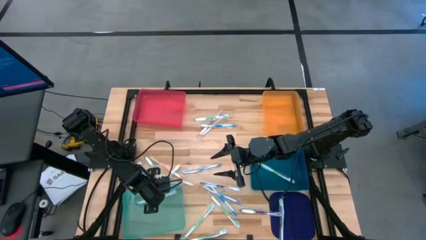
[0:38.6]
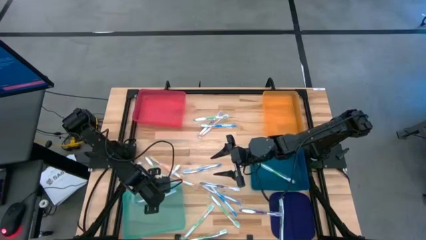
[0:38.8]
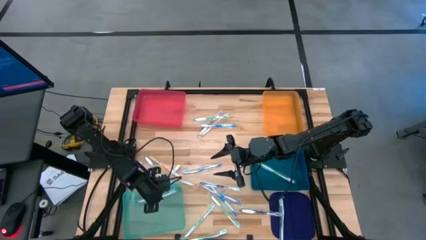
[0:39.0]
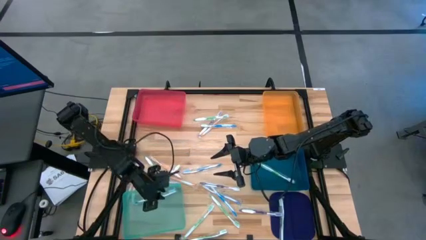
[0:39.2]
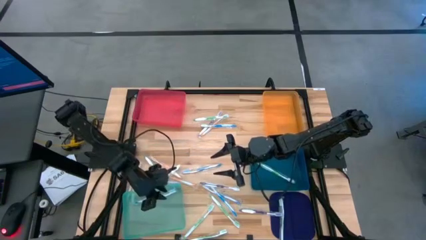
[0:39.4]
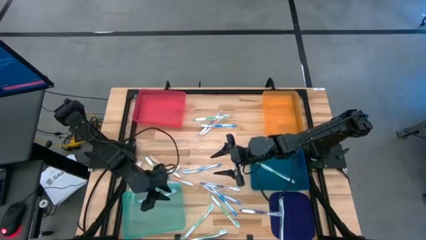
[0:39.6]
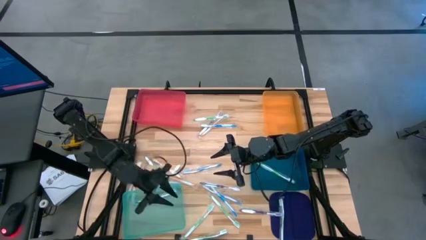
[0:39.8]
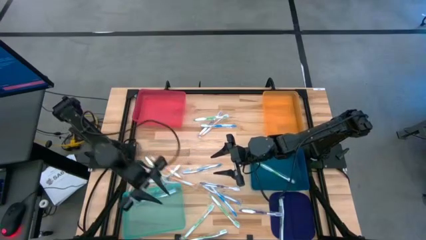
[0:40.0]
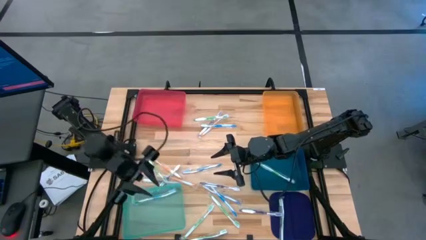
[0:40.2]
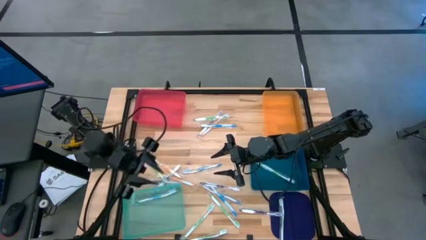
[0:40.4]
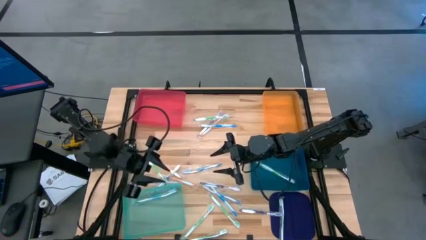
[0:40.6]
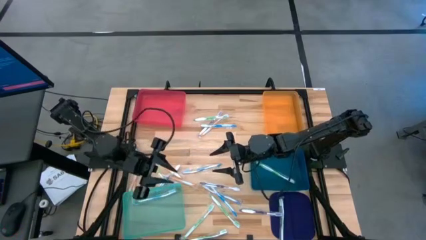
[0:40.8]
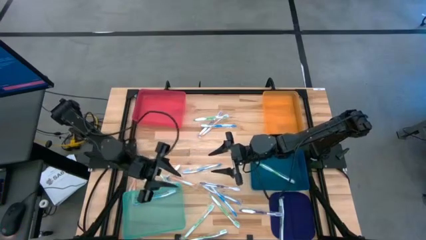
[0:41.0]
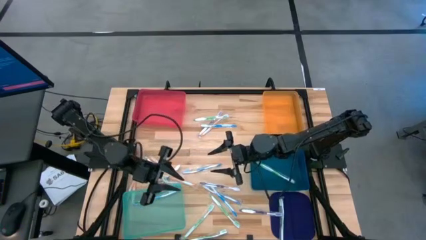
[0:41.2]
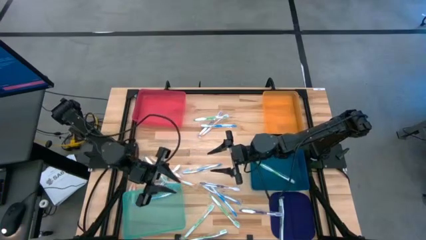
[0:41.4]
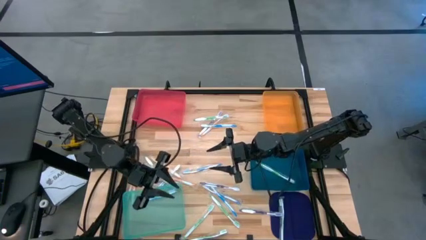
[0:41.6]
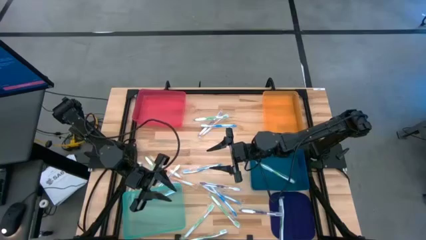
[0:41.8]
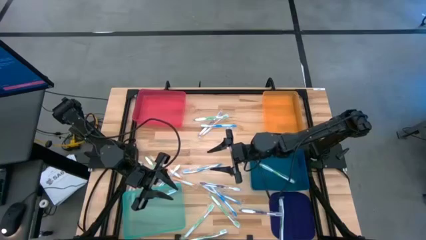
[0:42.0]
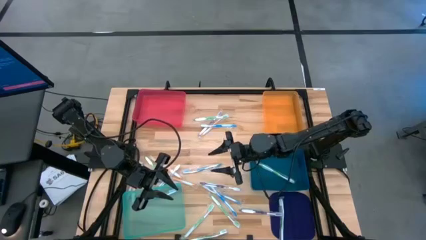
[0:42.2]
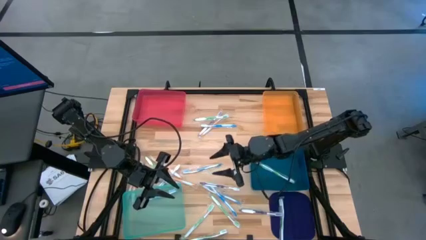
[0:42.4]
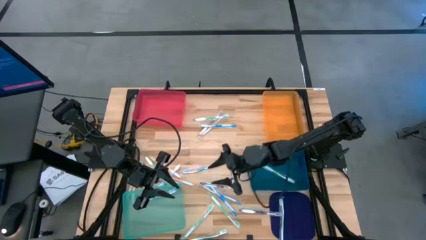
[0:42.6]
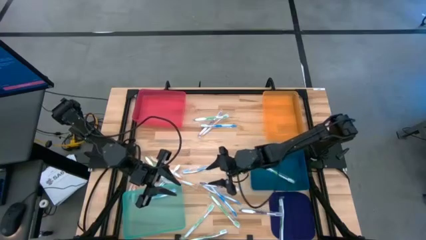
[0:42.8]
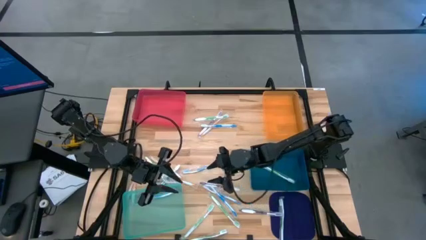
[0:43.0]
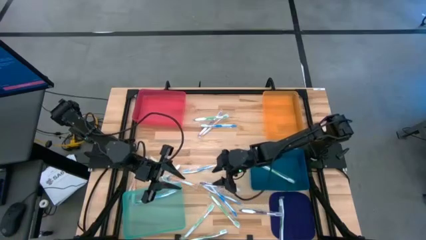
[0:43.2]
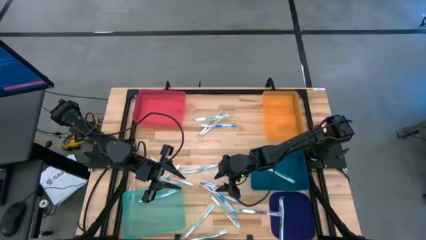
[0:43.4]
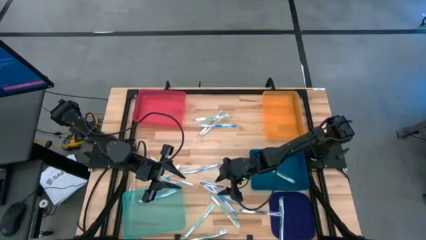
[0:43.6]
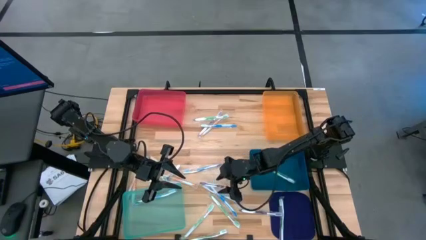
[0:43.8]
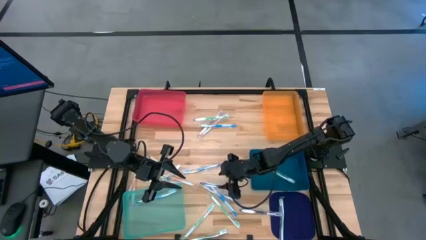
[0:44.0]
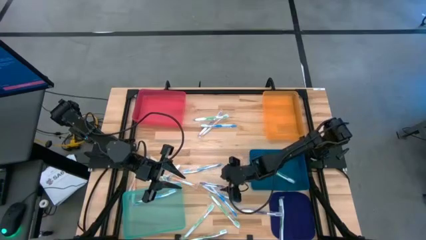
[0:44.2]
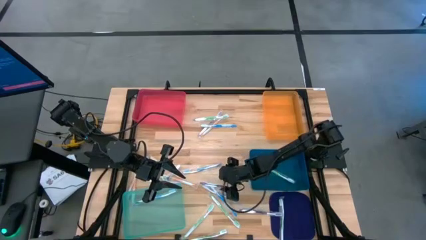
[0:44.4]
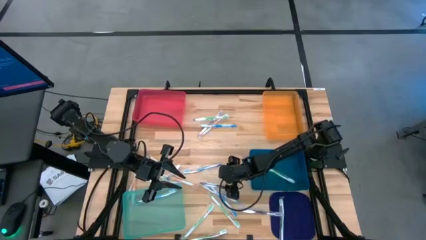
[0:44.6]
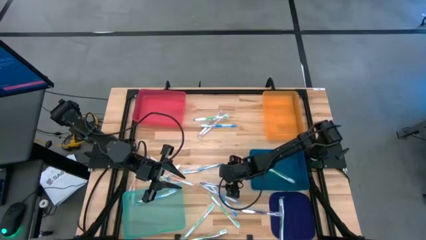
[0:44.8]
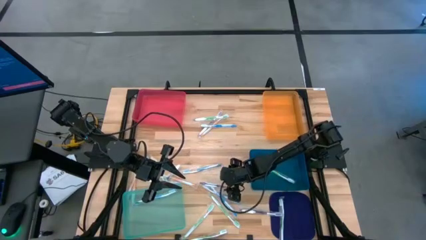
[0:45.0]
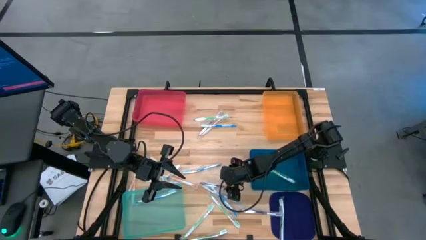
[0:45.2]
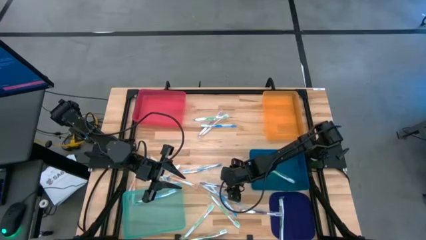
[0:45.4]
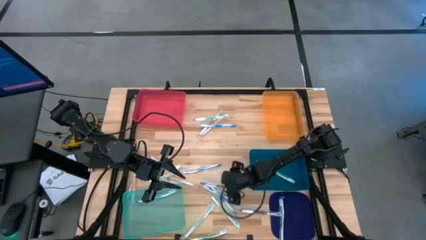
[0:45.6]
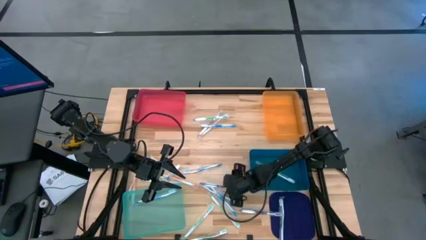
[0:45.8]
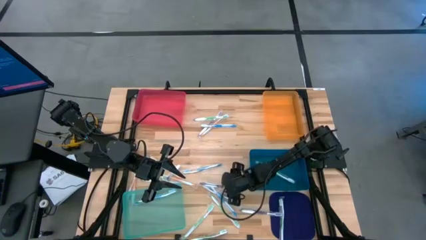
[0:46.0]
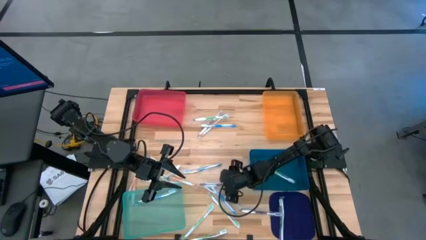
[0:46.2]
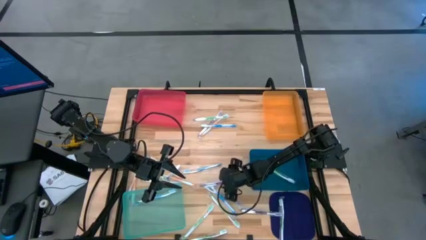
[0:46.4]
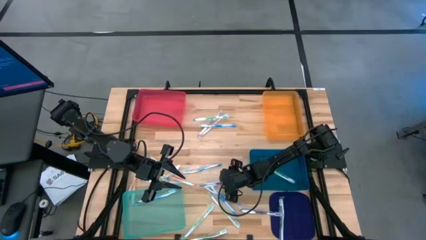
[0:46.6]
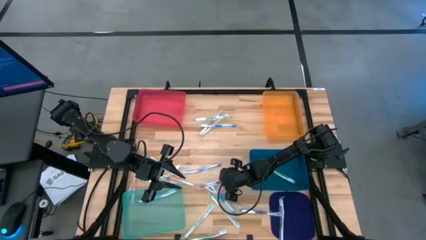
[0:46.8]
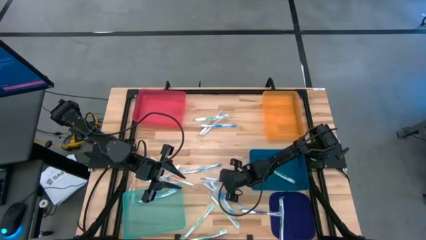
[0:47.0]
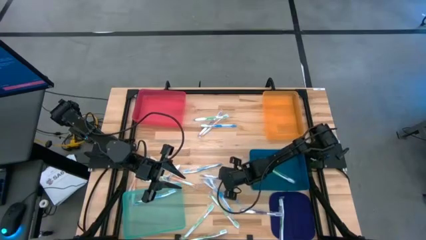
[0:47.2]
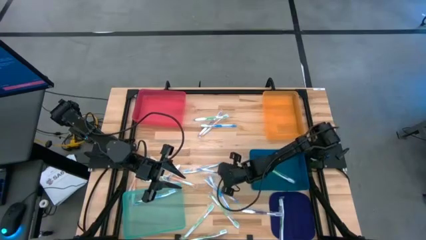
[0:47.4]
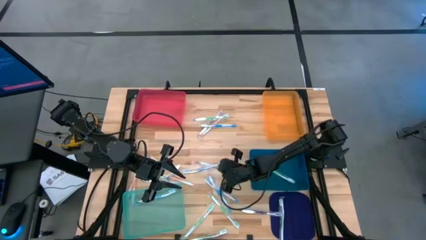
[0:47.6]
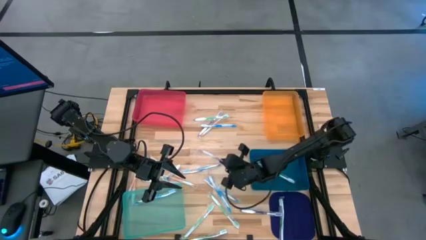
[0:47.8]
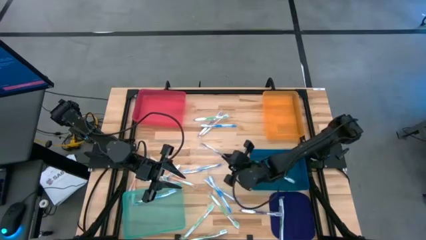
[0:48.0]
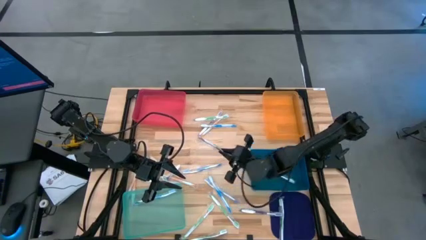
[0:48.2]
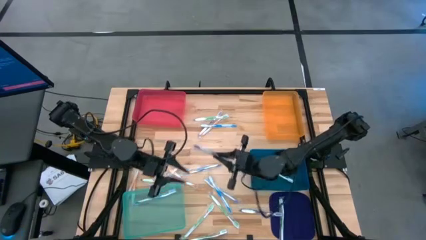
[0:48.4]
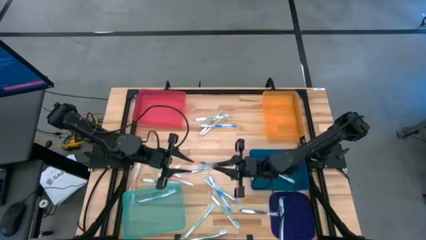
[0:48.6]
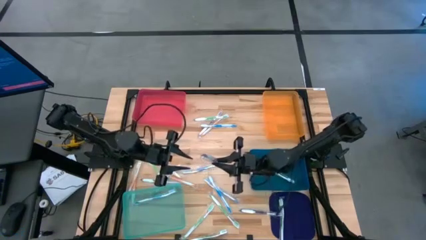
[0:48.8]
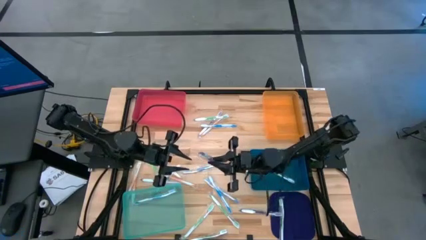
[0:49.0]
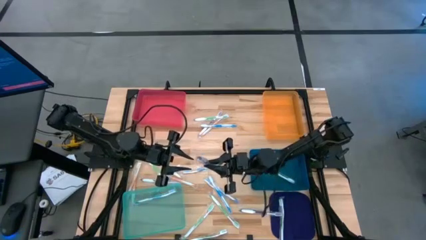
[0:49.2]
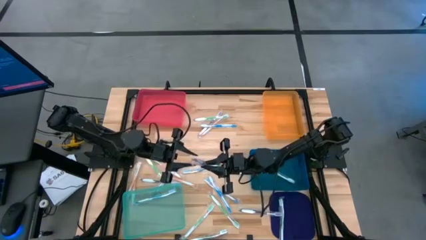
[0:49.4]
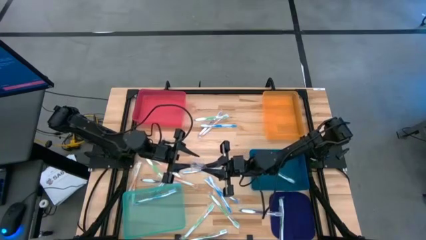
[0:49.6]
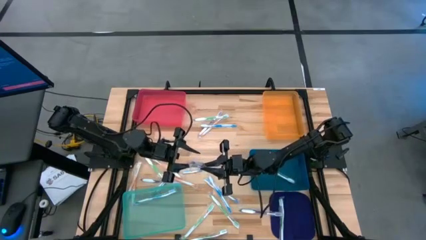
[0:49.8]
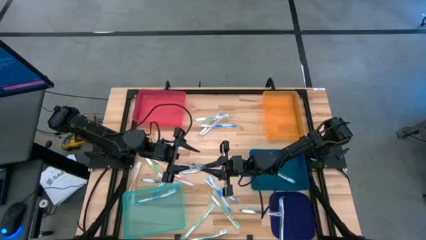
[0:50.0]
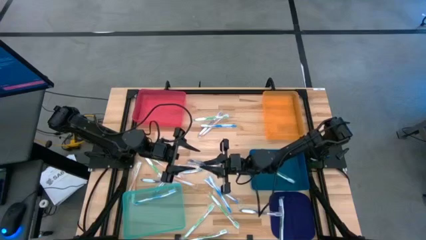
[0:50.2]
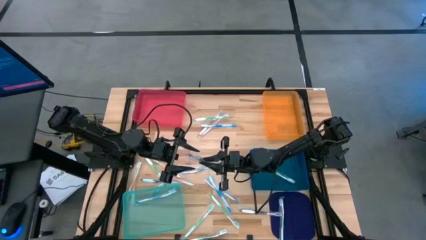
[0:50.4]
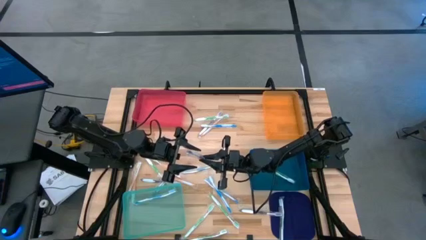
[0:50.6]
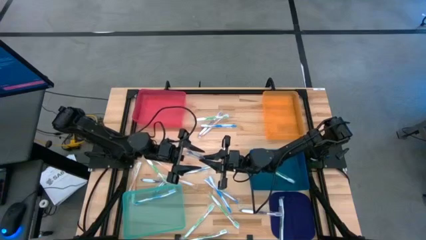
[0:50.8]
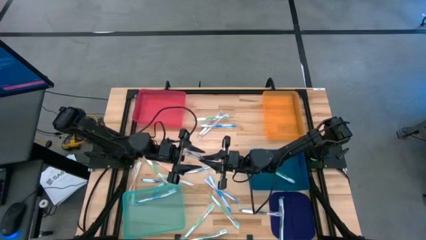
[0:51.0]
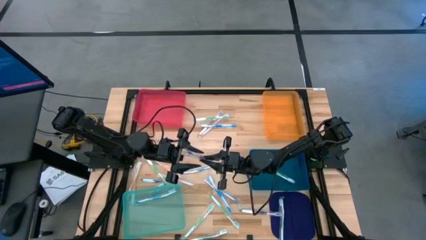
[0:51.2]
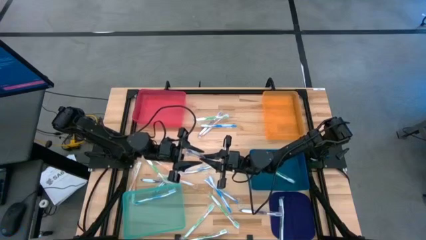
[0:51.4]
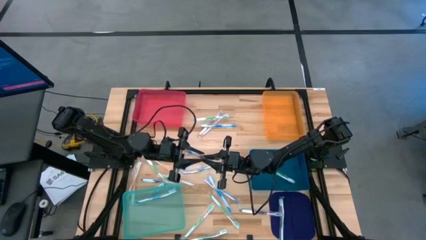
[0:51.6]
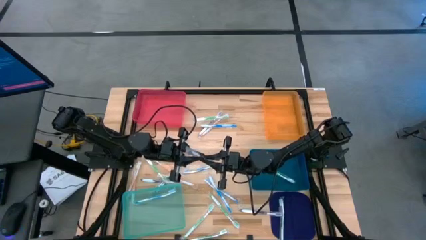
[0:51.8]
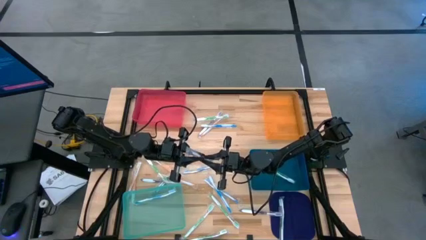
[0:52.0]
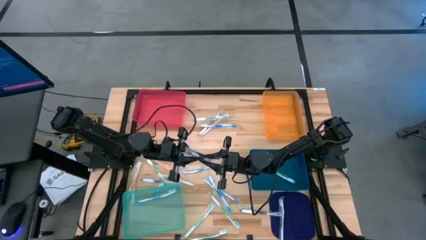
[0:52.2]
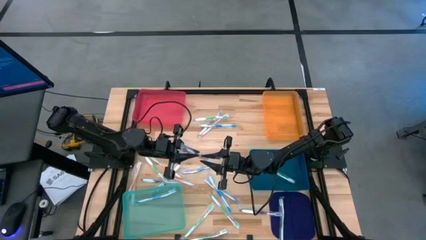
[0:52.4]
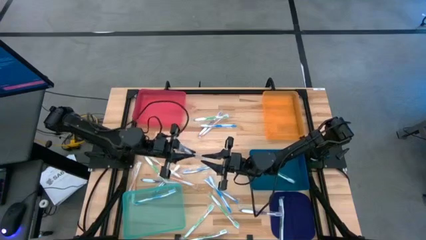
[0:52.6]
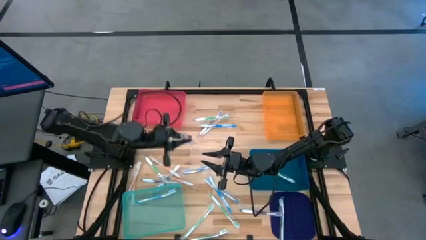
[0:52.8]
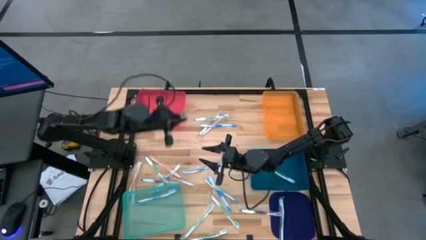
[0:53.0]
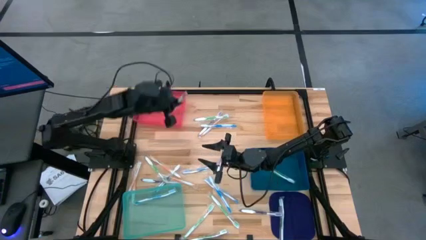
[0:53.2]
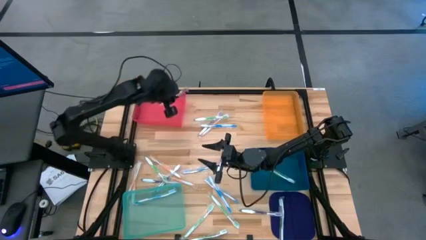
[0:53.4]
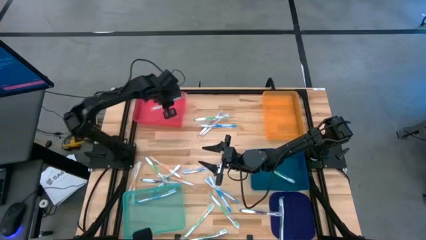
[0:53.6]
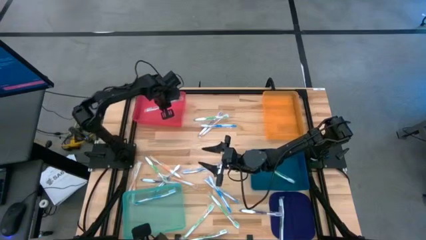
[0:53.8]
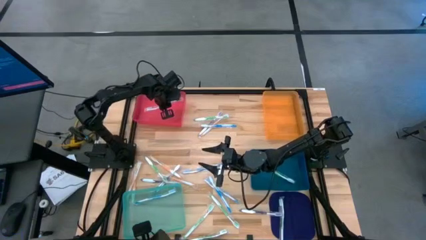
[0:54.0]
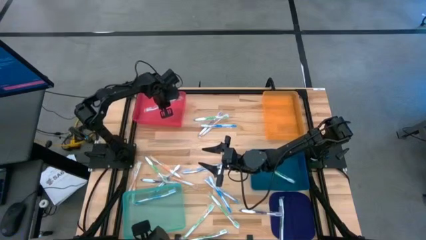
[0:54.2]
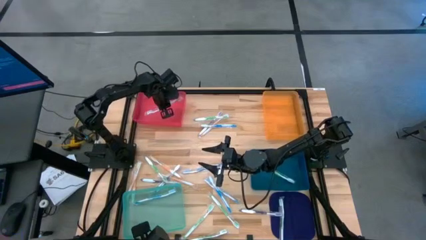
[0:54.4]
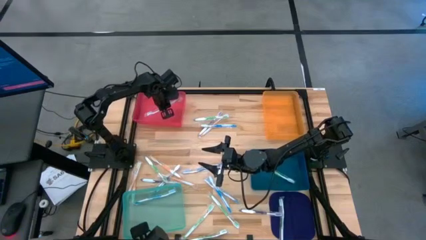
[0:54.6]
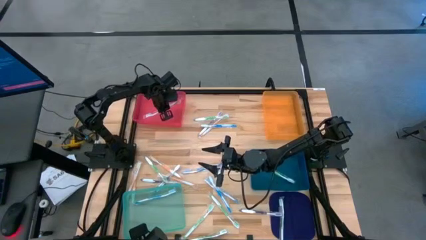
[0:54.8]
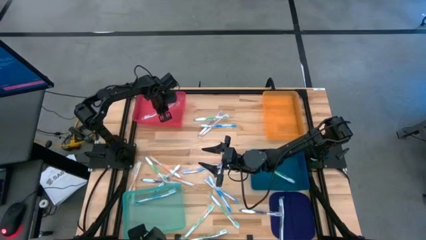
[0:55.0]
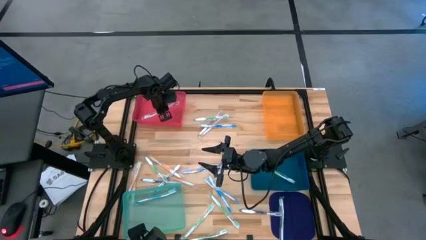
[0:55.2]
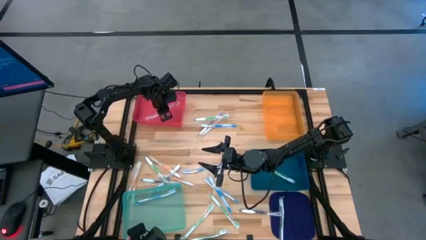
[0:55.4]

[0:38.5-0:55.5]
Task: Pick & Place Toothbrushes
Put the violet toothbrush into the pink bin
